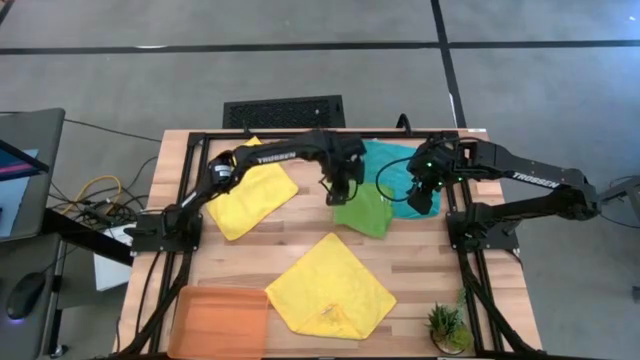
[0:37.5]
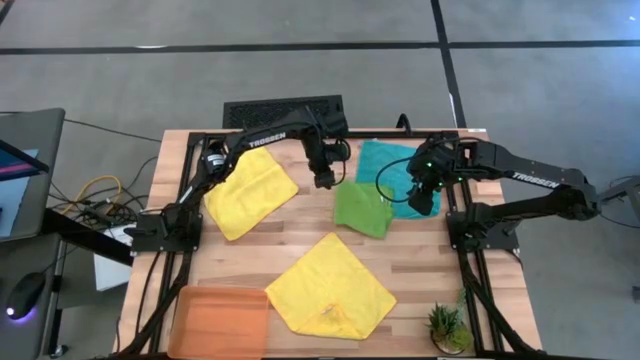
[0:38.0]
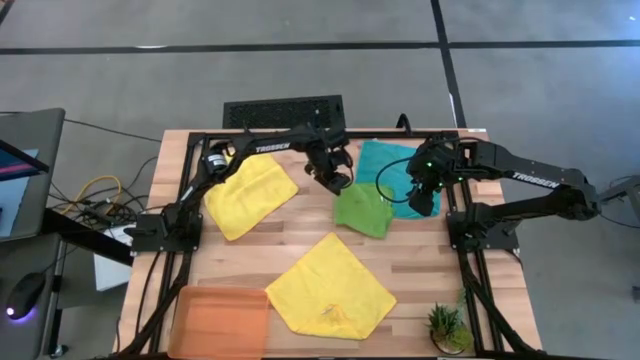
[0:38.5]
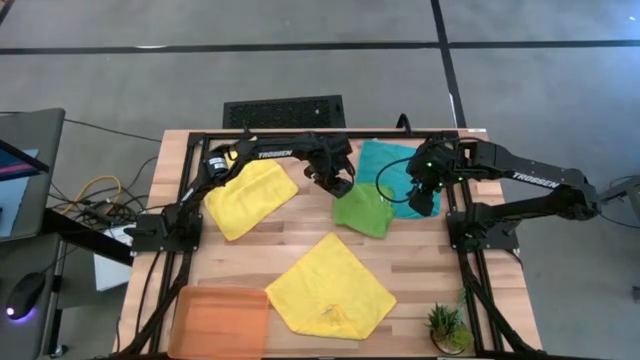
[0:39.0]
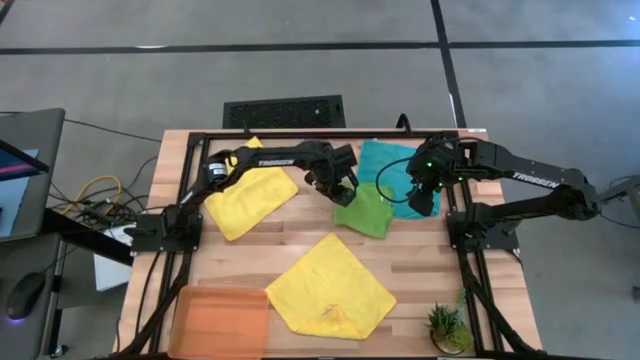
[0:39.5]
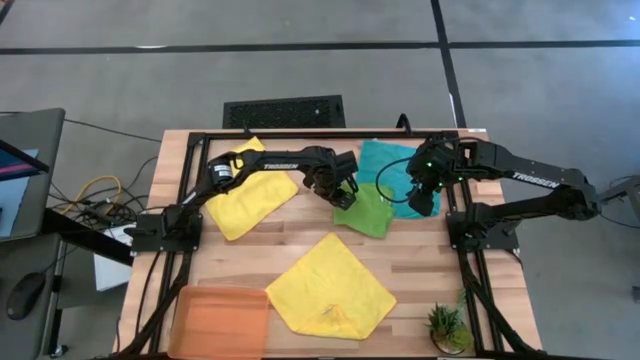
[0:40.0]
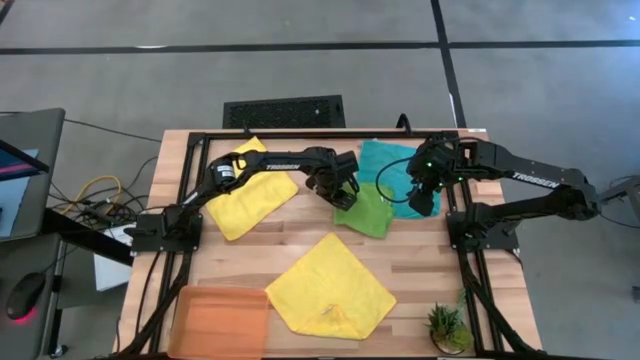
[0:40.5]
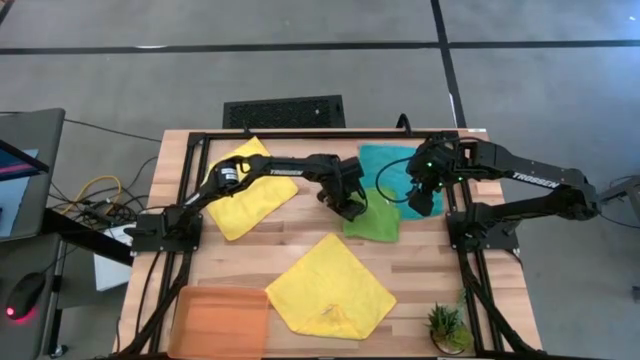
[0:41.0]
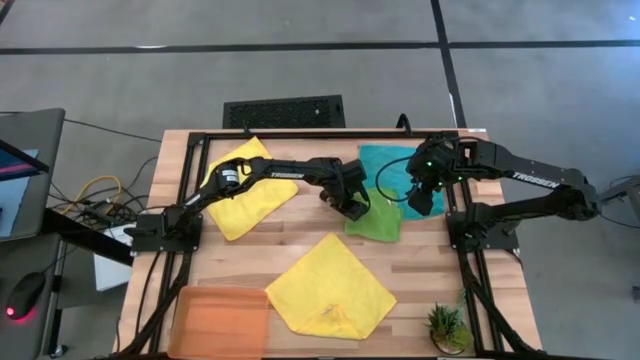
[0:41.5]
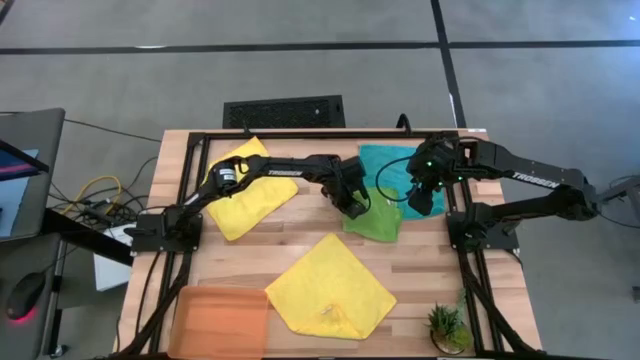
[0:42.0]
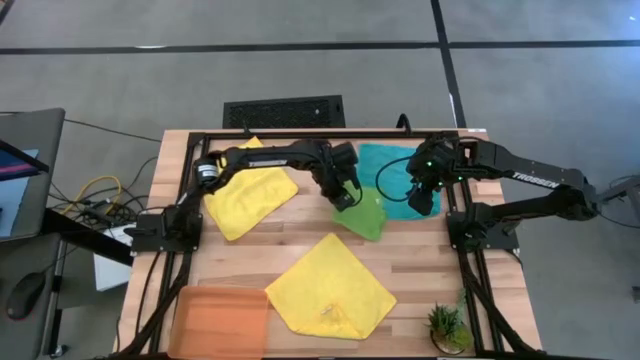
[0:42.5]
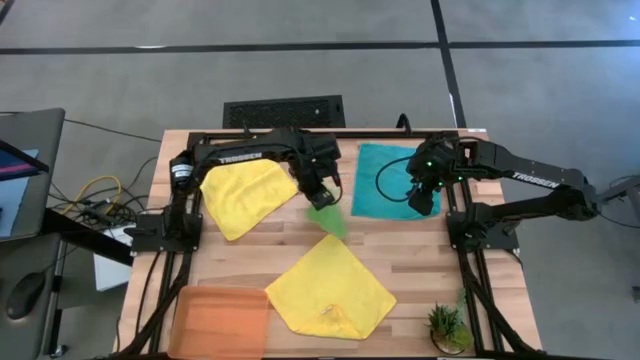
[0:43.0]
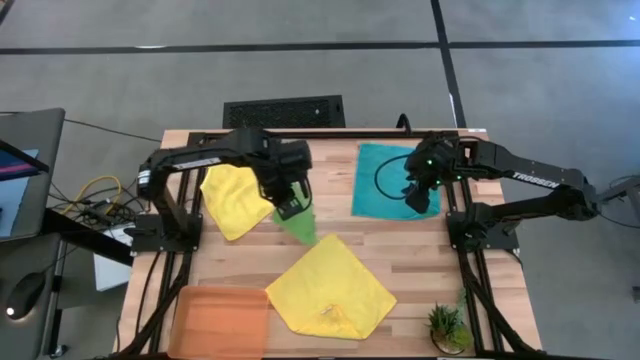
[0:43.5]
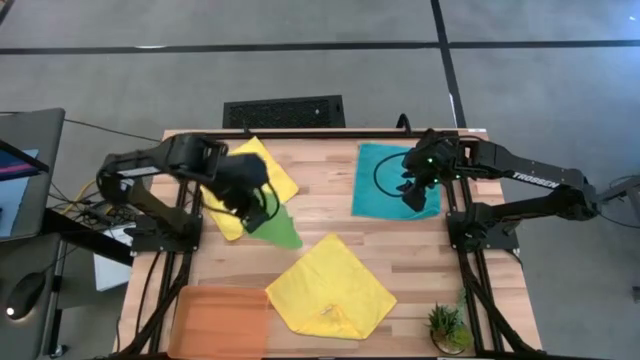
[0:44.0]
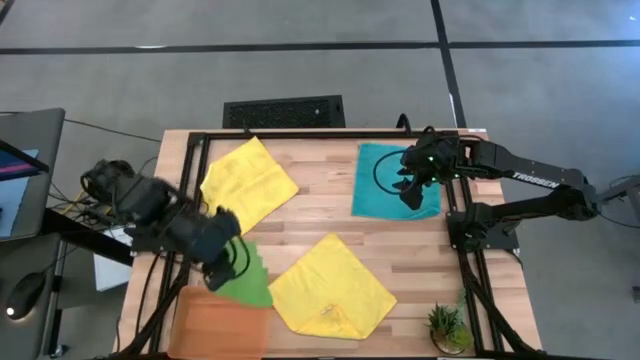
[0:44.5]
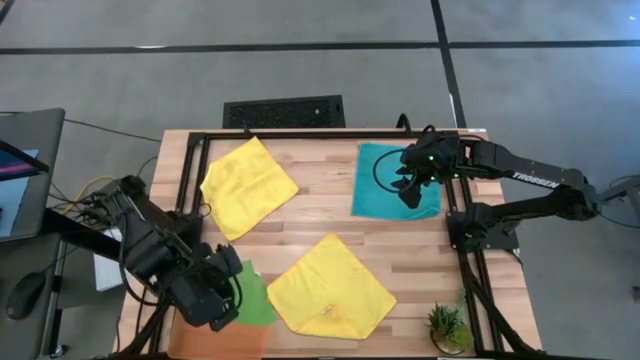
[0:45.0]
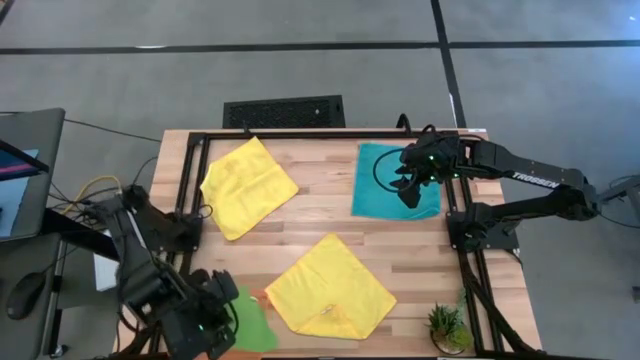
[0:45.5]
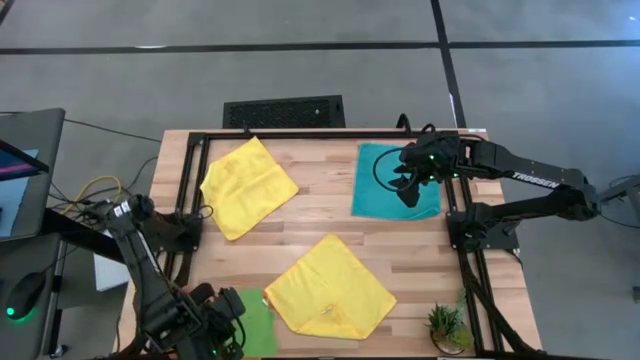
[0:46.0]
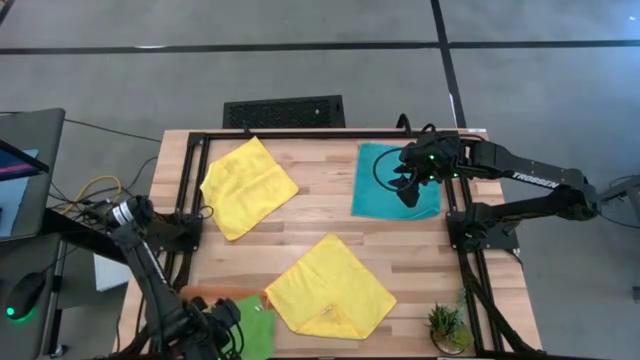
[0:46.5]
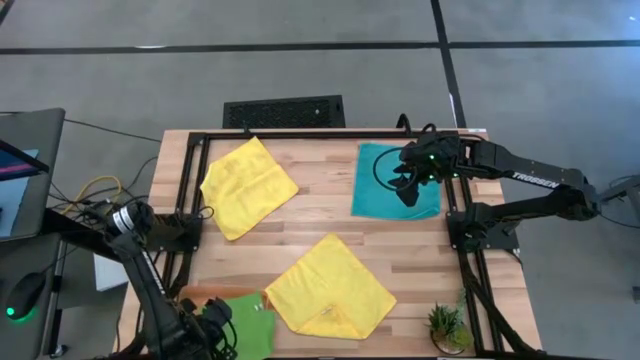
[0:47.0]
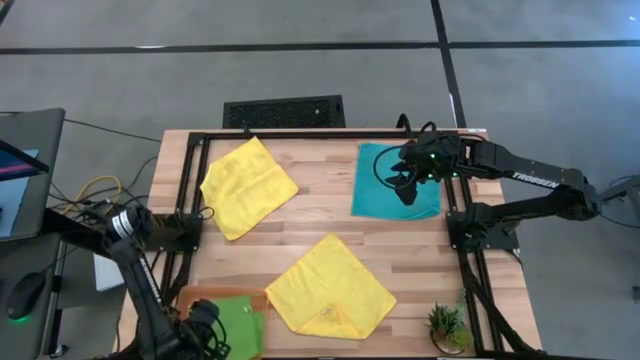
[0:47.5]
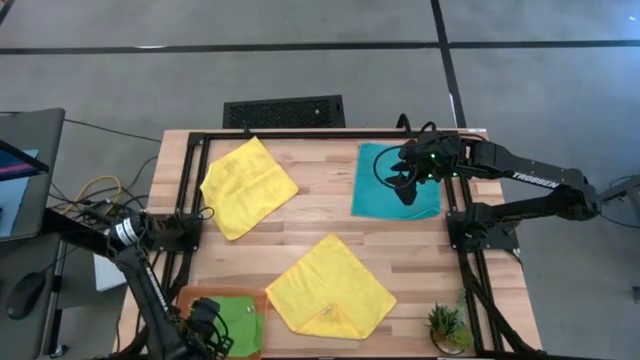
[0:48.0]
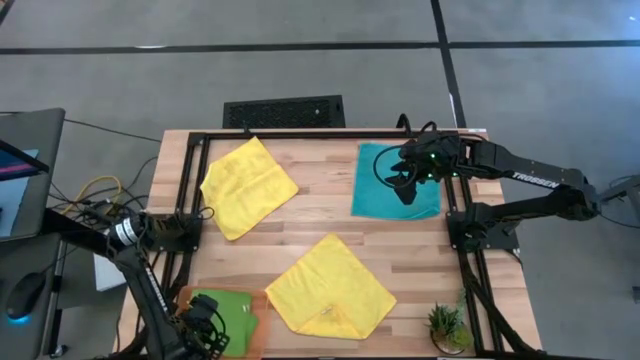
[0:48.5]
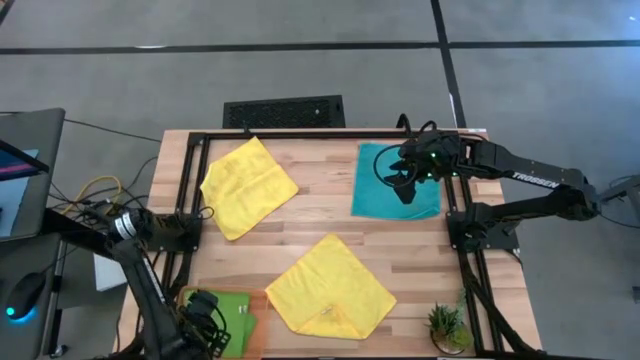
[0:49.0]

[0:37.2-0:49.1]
Task: Fold microfiber towels
Put the green microfiber towel into the bin

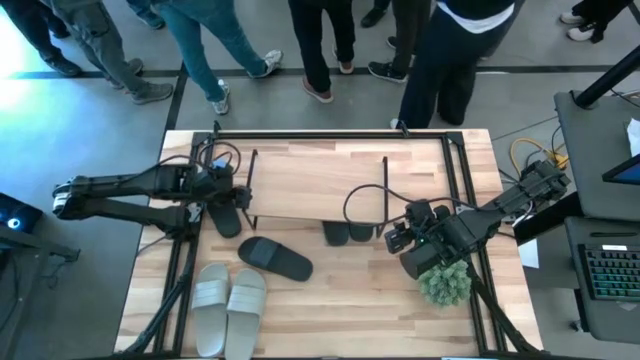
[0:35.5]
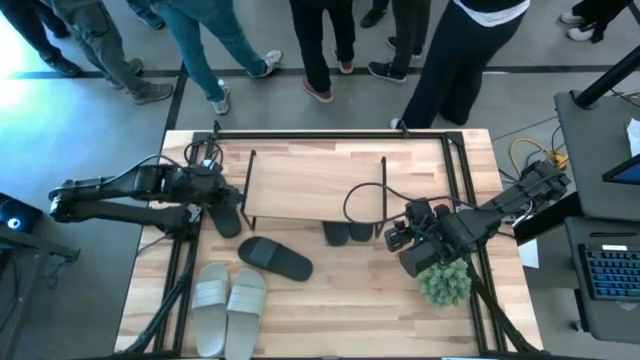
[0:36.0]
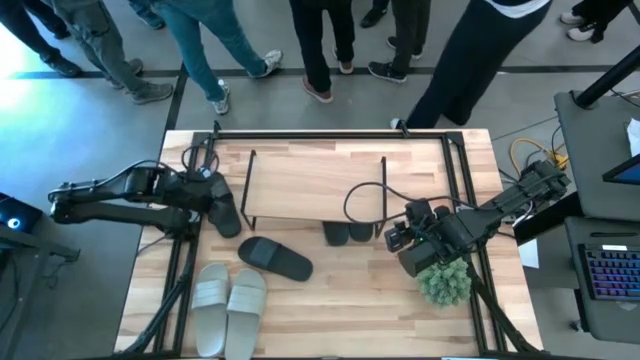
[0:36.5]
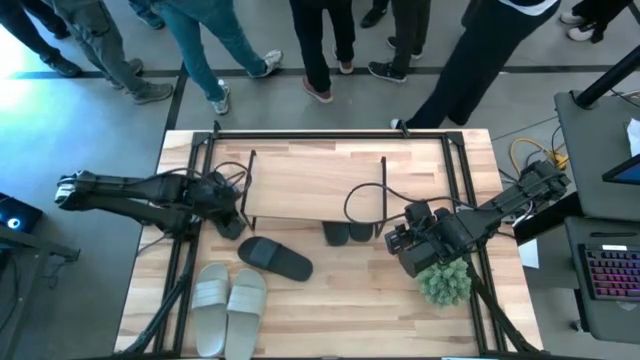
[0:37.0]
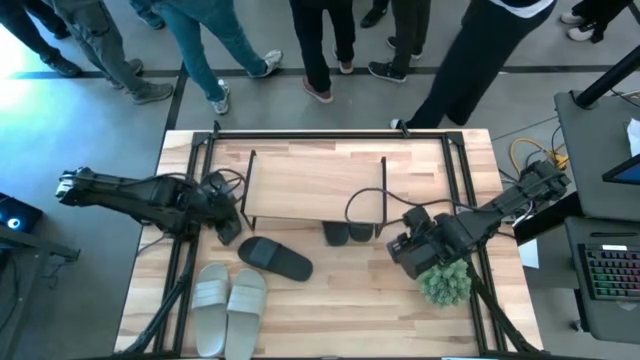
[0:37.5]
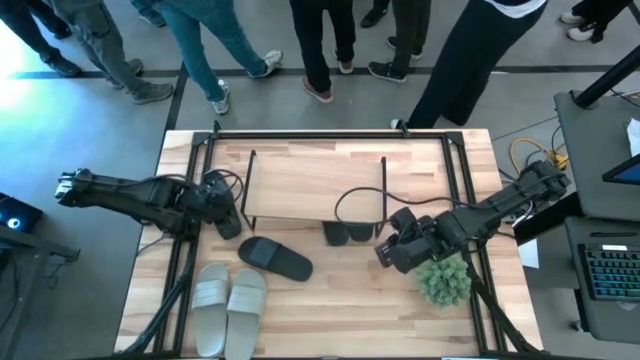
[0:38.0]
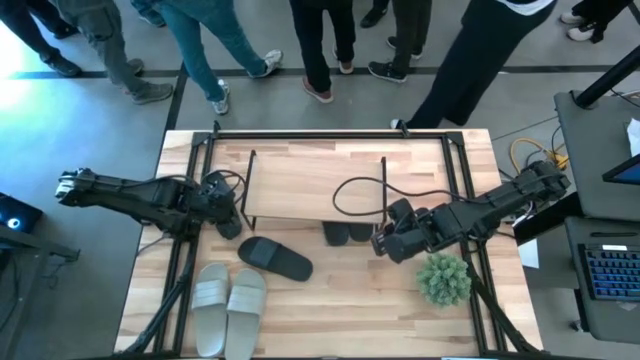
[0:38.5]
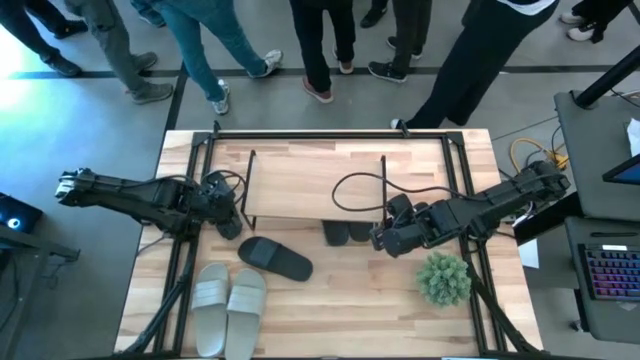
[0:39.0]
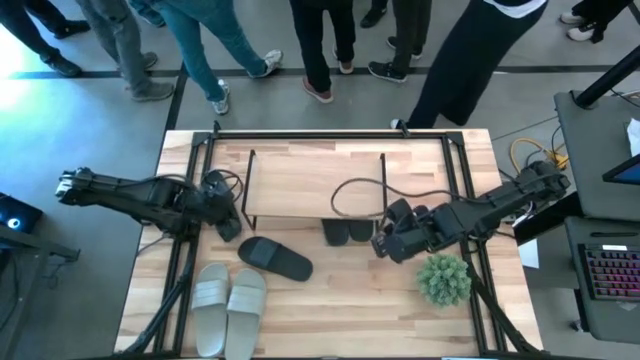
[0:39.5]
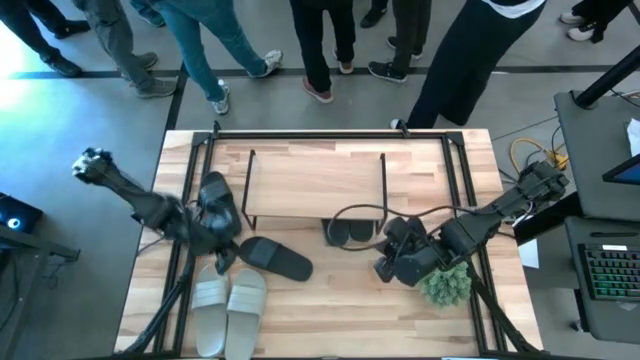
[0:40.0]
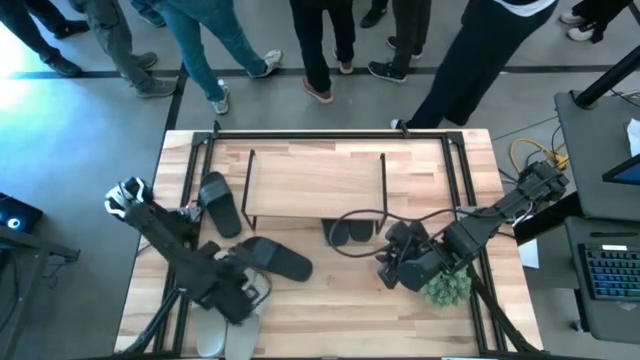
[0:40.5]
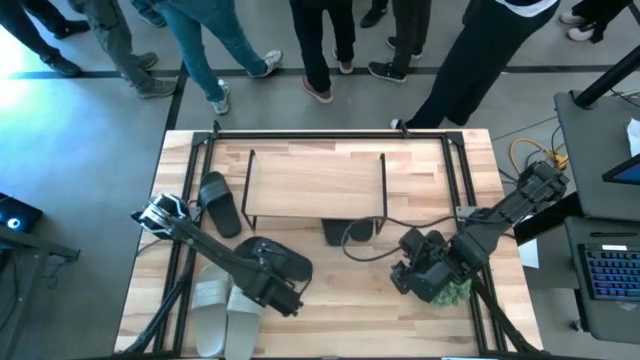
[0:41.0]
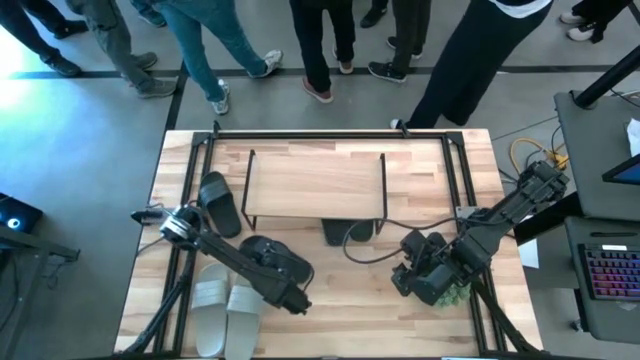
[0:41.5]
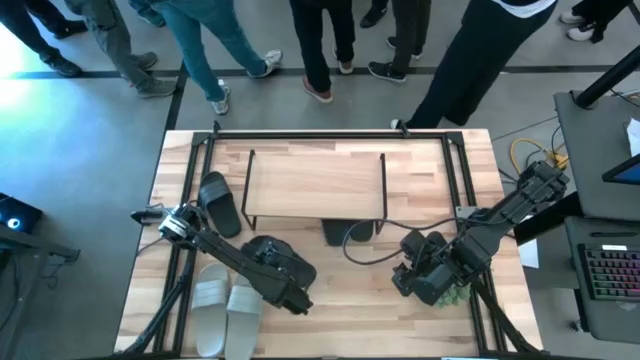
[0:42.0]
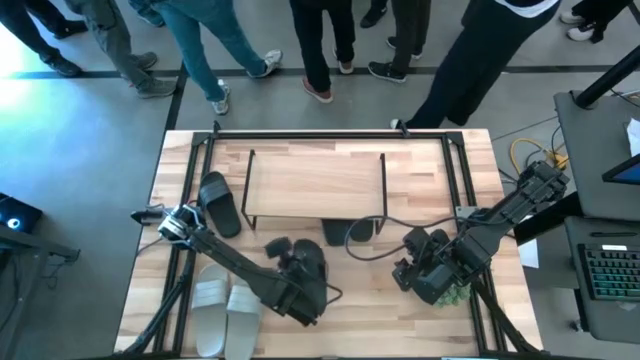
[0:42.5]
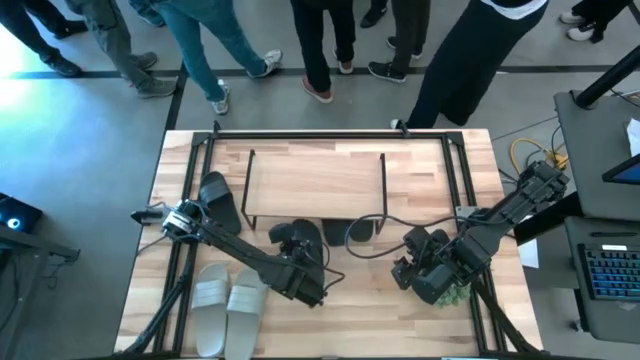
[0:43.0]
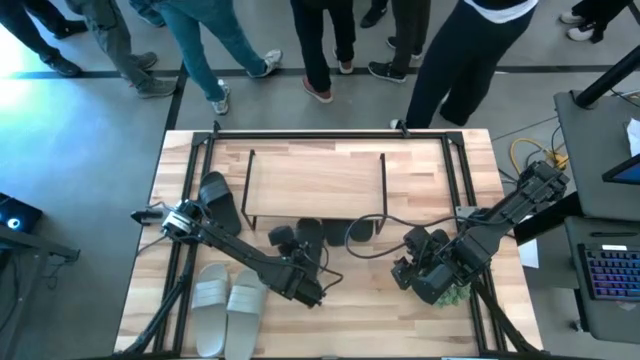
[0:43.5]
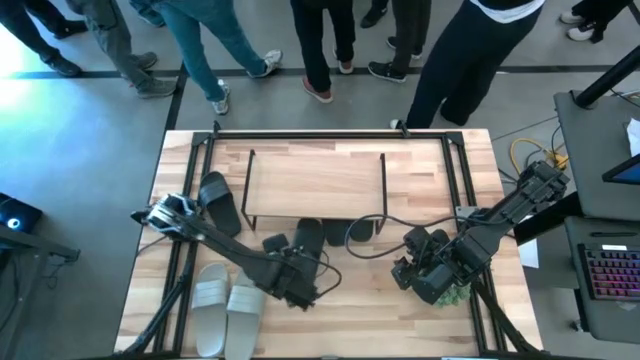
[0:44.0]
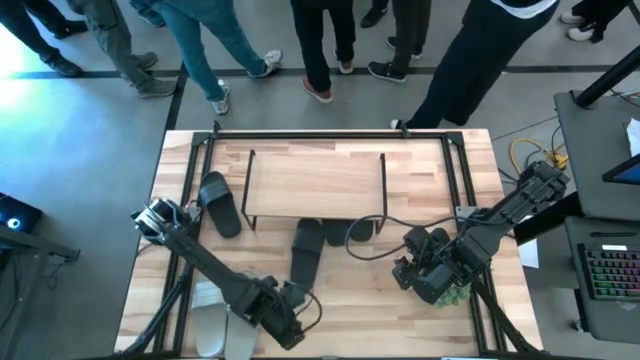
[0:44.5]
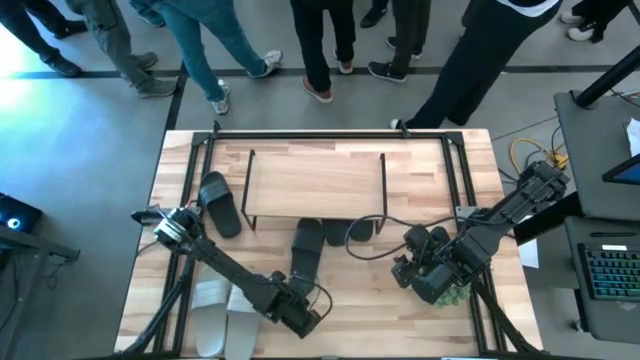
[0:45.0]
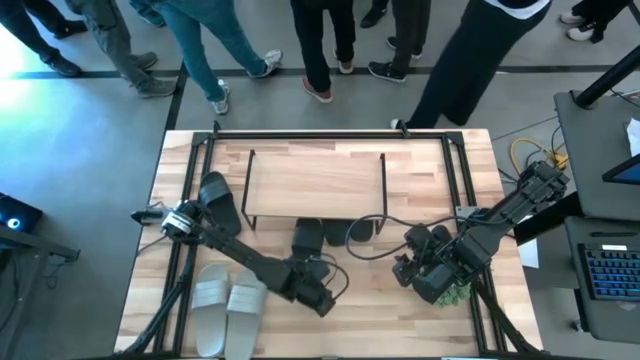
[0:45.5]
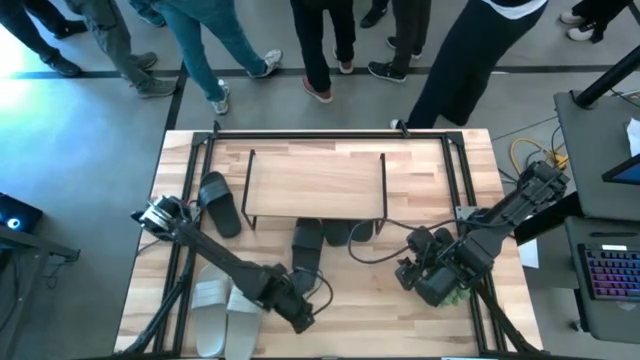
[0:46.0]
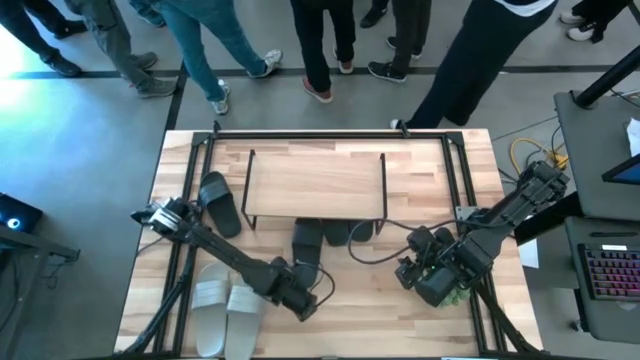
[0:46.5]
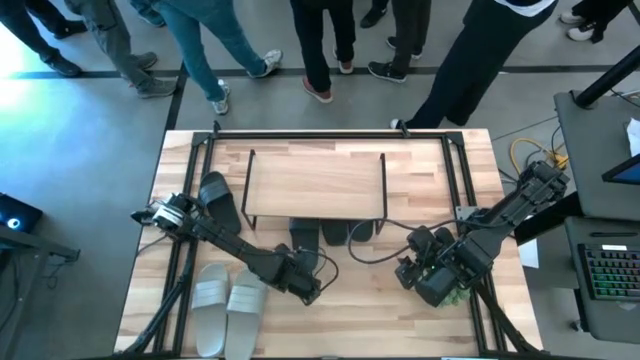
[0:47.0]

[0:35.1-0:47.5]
Task: Pick and place slides into the shelf
Put the bottom black slide under the shelf
